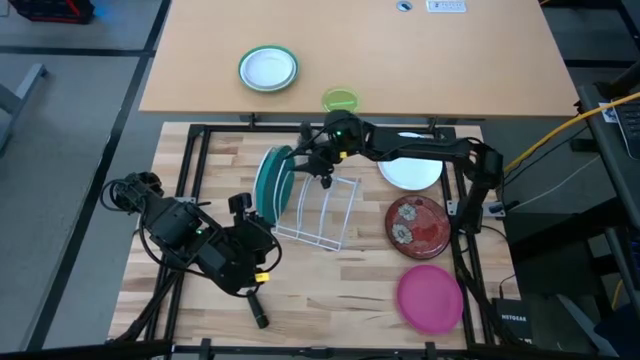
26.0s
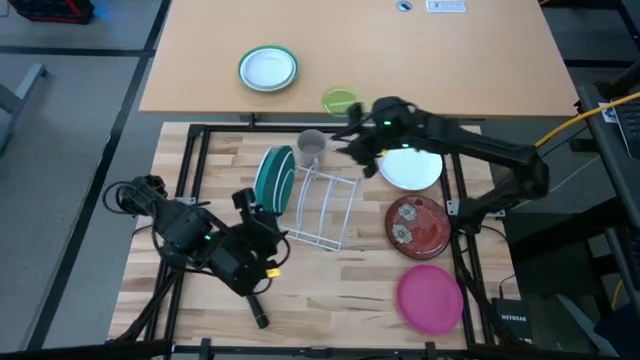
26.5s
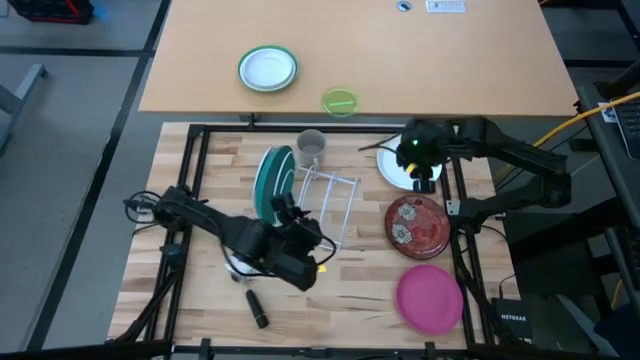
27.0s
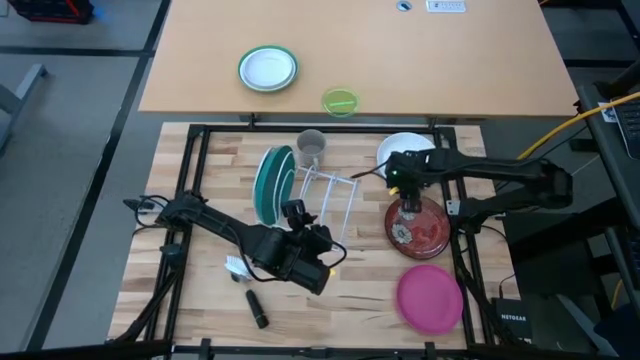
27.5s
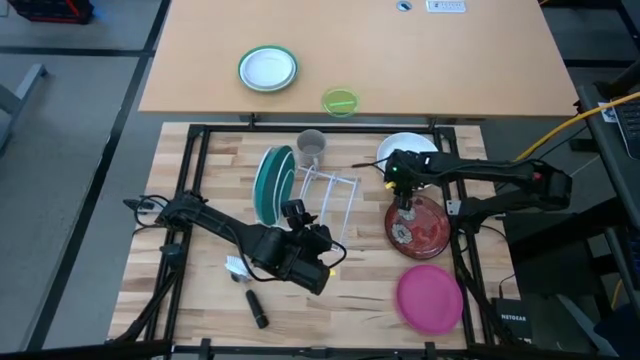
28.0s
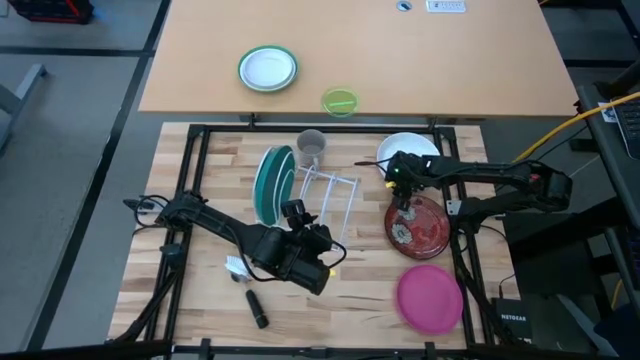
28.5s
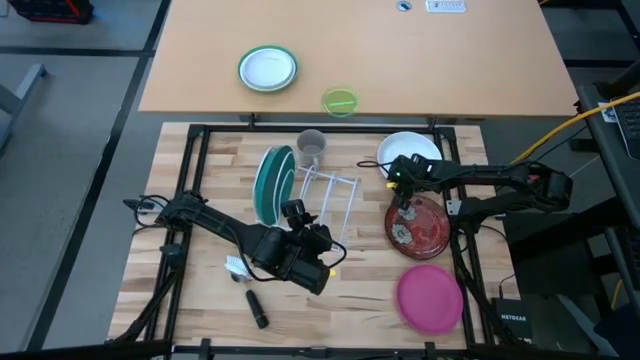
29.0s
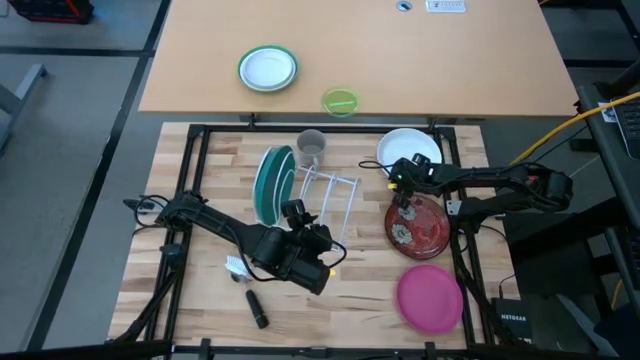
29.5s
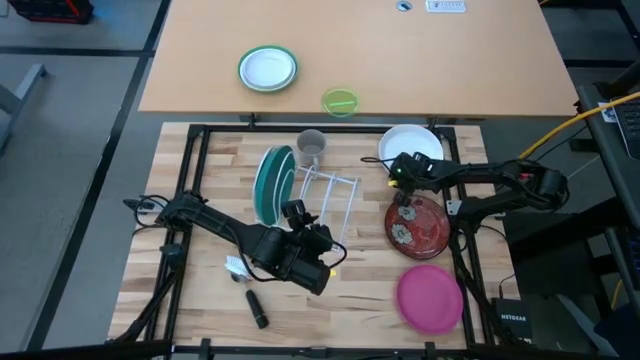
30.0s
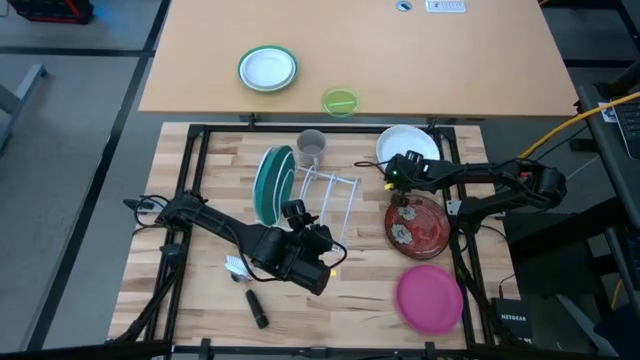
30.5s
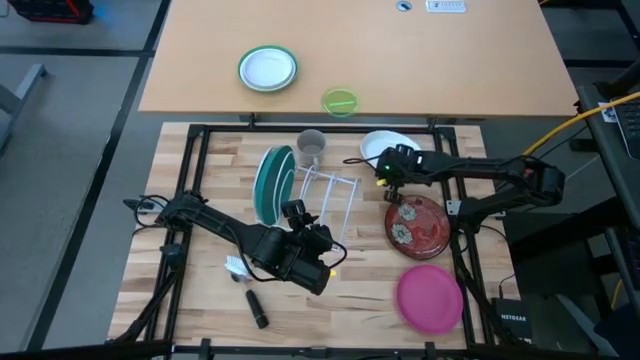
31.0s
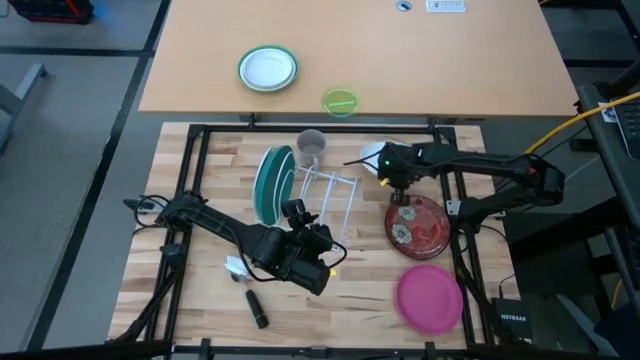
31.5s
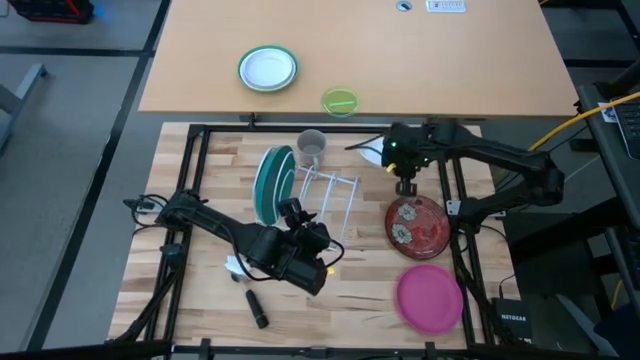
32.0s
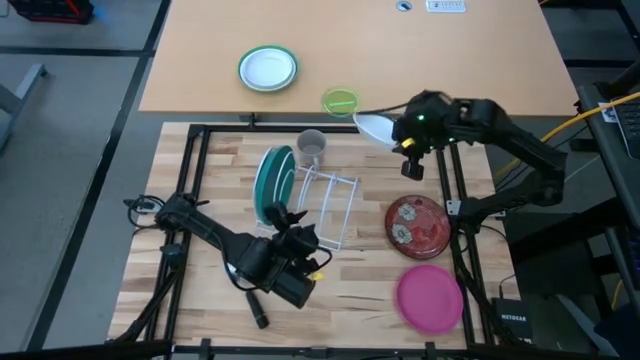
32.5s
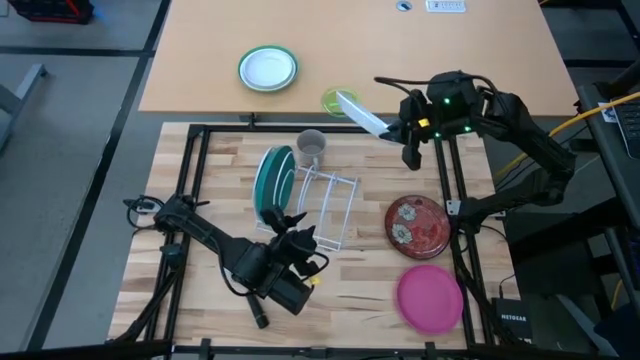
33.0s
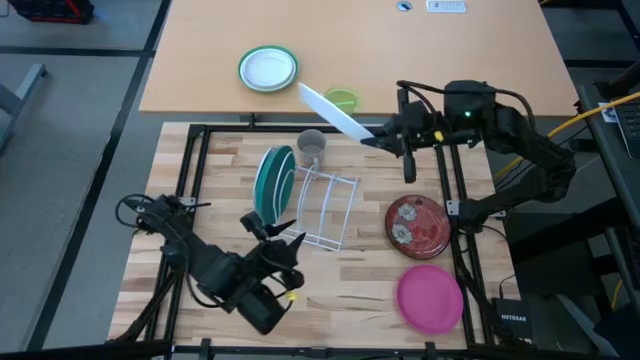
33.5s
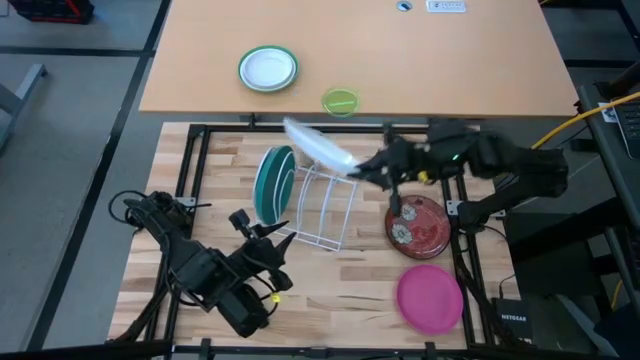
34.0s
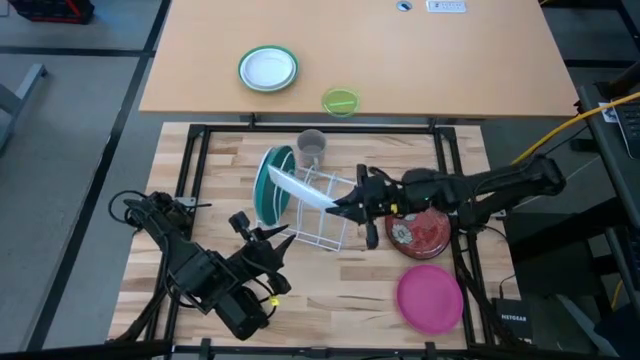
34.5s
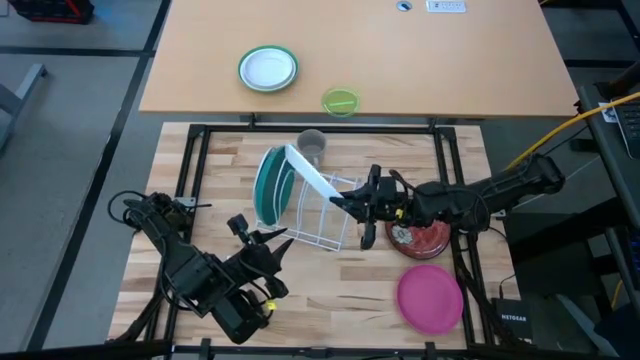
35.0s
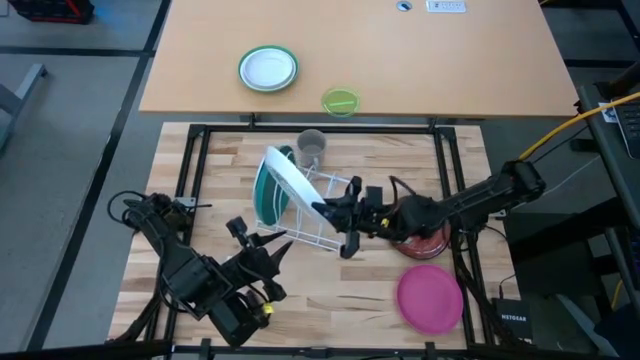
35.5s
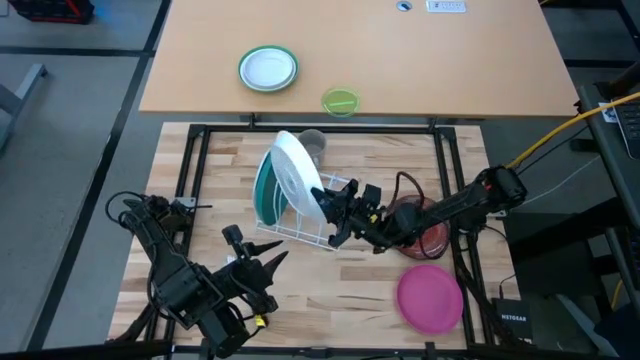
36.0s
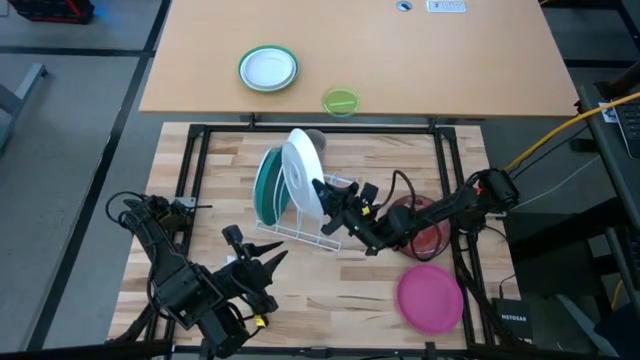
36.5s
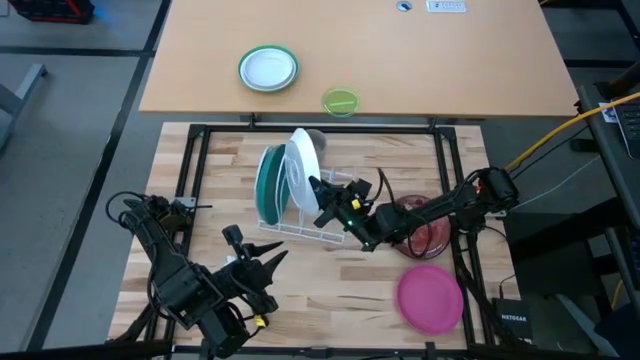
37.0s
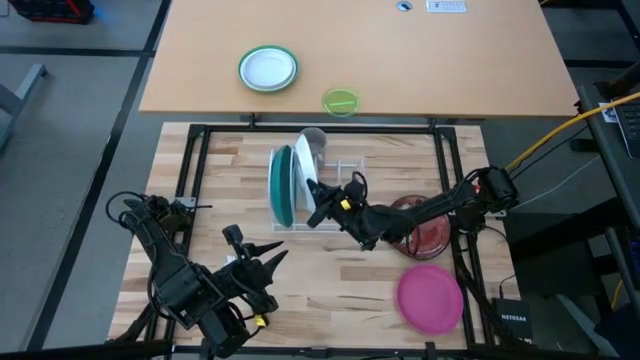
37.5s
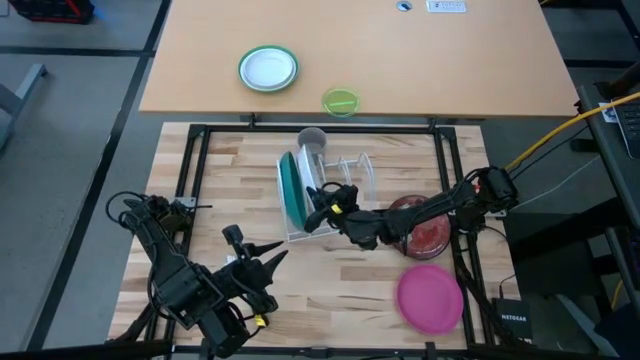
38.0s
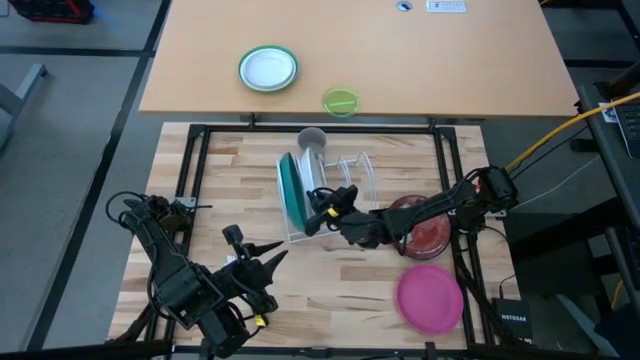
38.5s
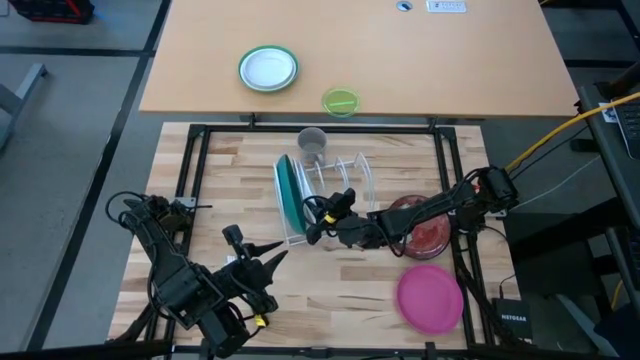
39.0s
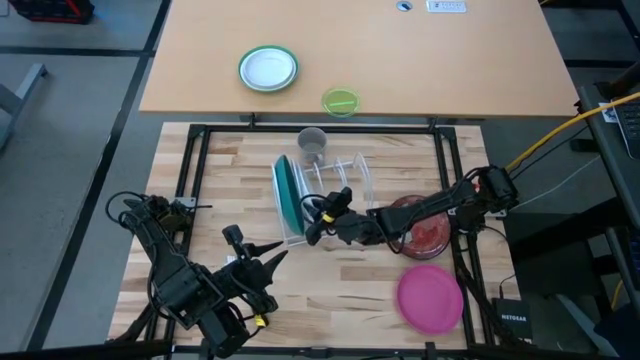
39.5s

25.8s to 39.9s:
Task: Sort dishes
Put the white plate into the dish rack

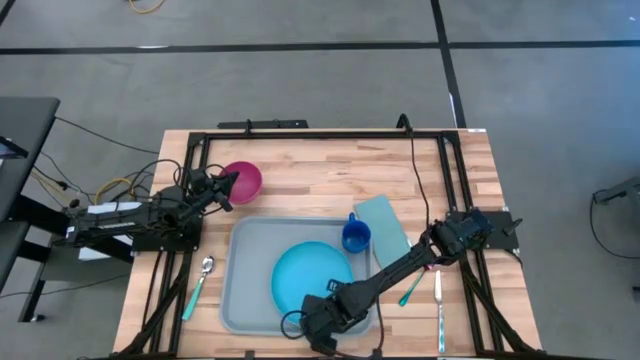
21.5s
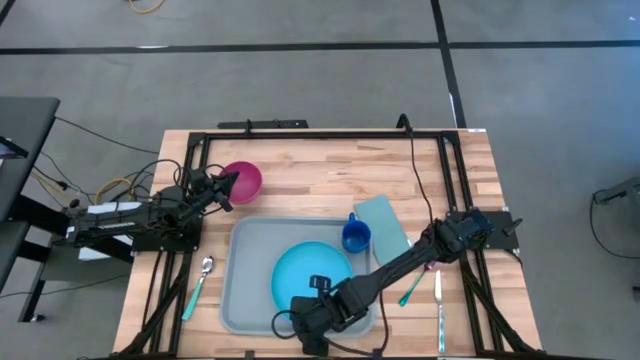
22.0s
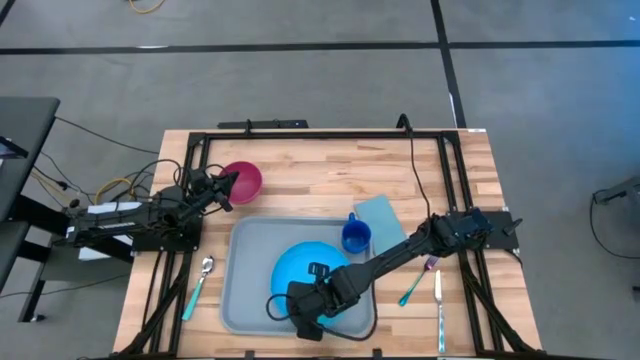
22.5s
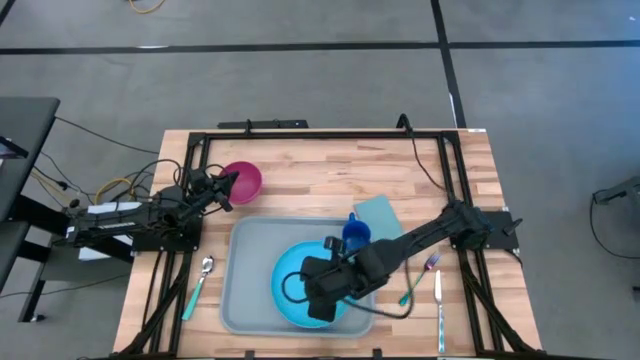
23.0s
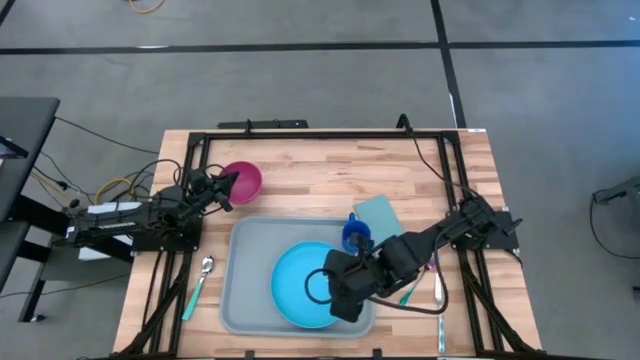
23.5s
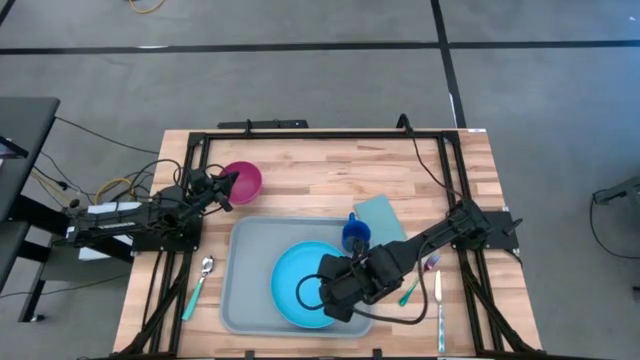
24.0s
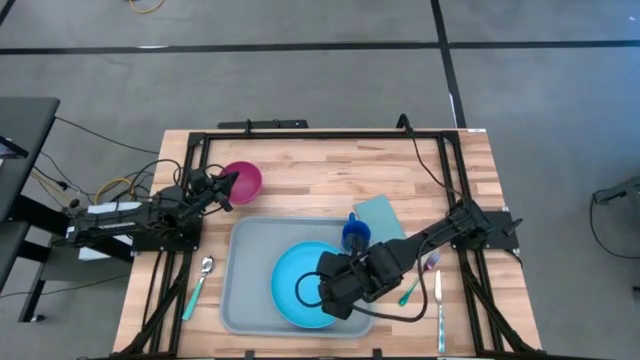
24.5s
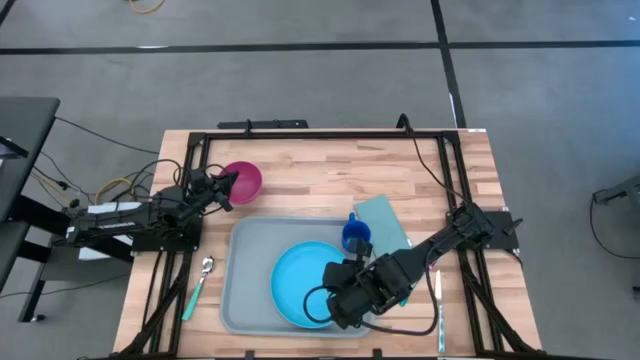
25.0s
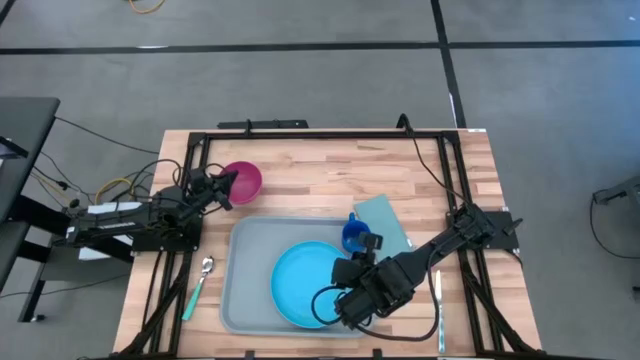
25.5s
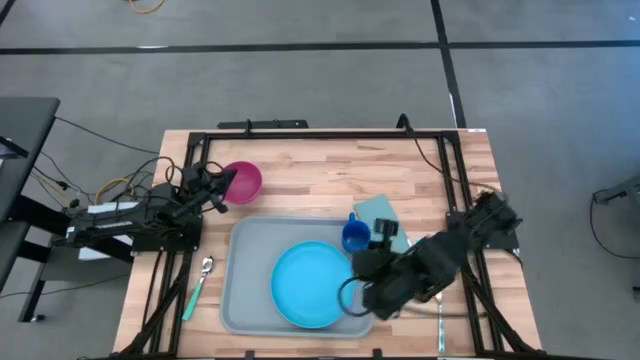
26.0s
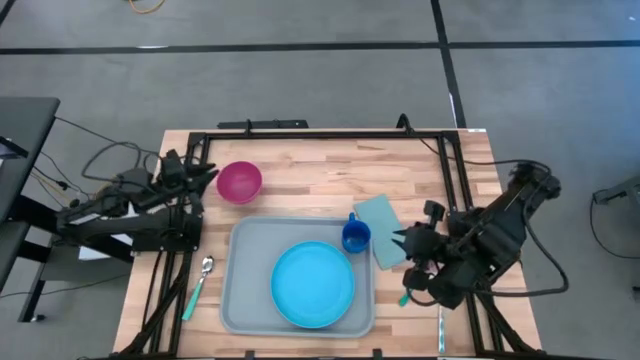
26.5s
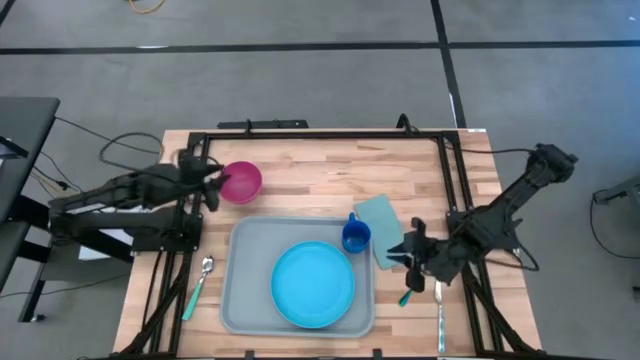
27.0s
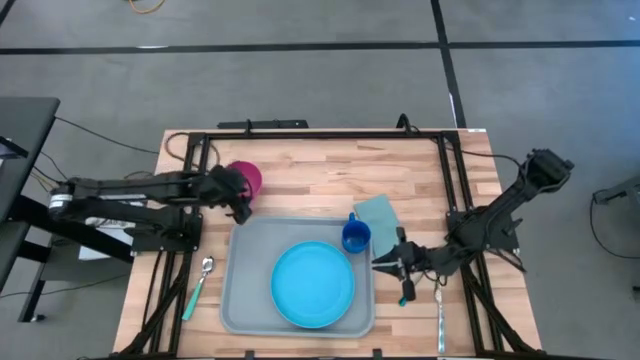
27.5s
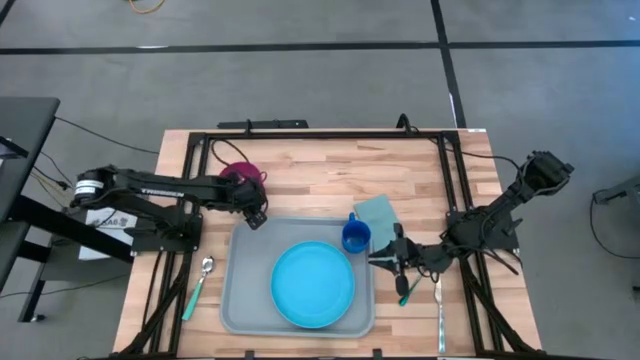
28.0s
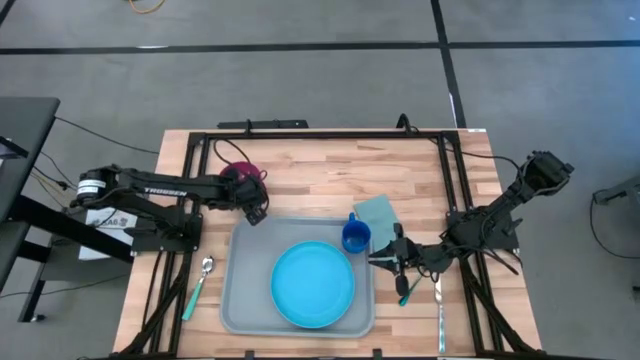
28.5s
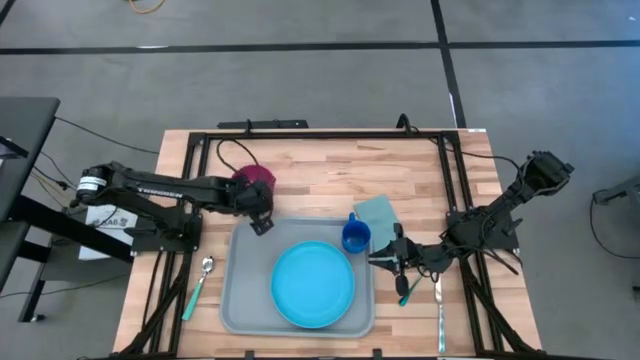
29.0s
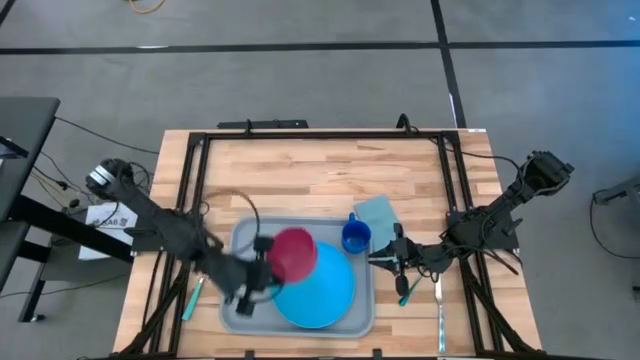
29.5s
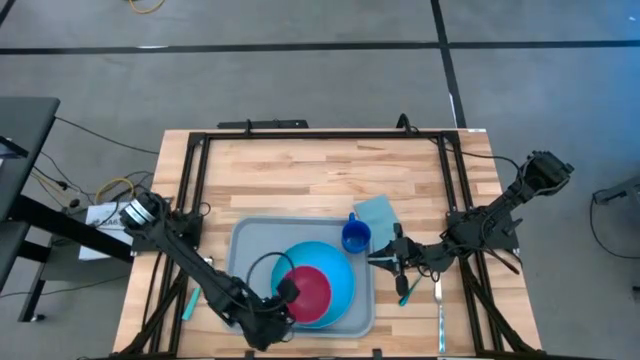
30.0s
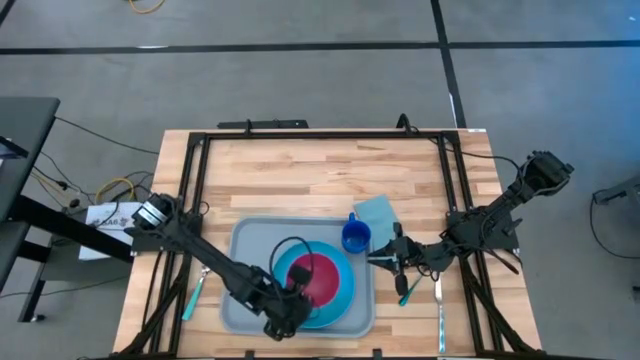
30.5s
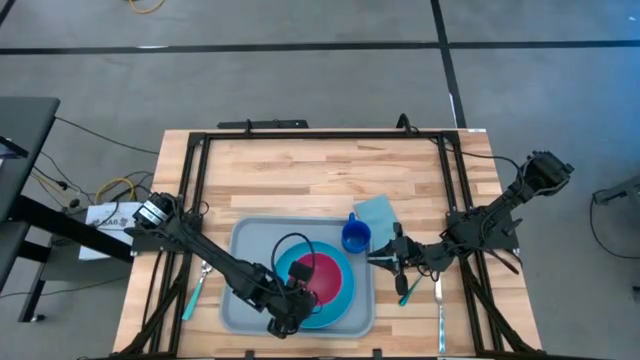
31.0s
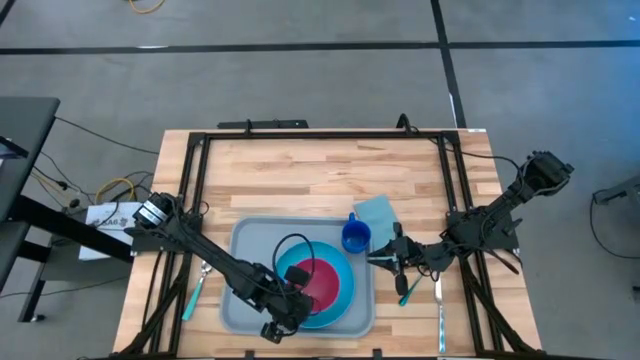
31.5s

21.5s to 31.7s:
Task: Set up tray
Put the red bowl on top of the light blue plate on the gray tray
